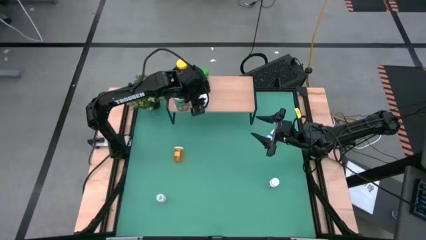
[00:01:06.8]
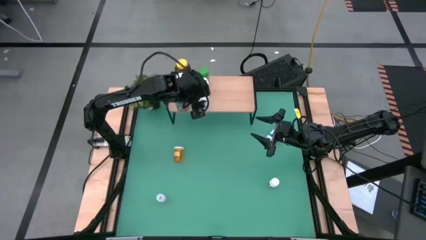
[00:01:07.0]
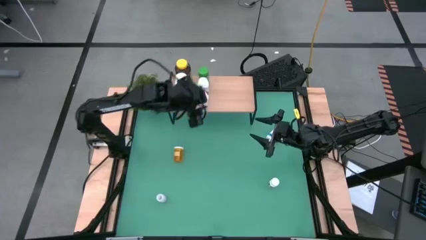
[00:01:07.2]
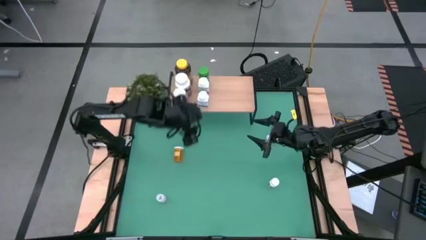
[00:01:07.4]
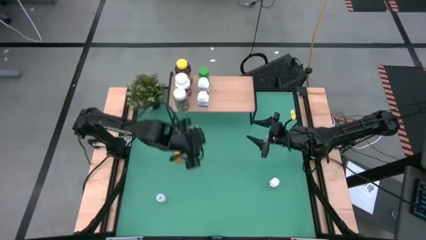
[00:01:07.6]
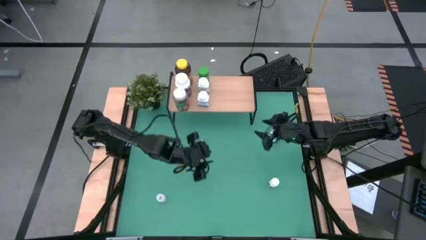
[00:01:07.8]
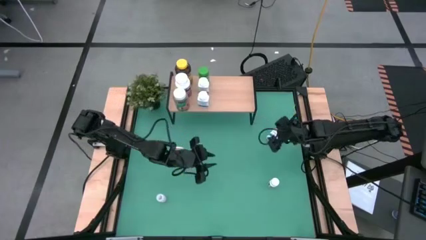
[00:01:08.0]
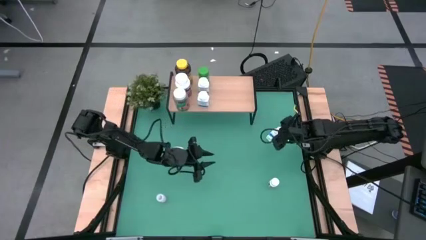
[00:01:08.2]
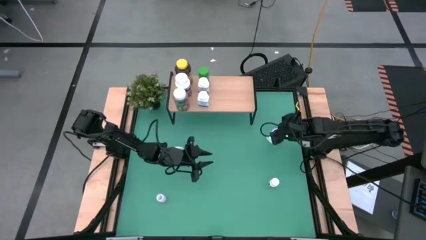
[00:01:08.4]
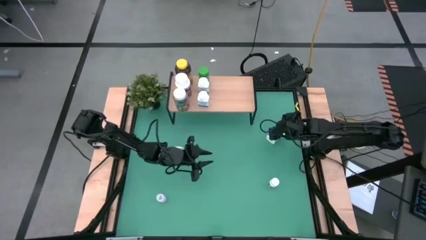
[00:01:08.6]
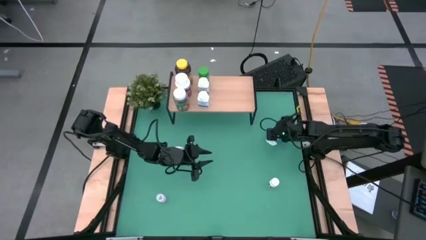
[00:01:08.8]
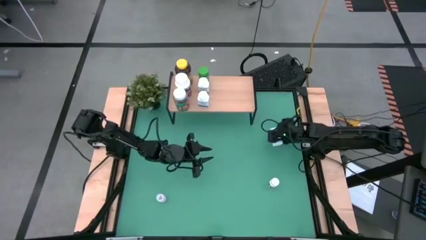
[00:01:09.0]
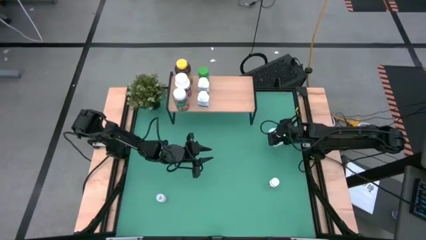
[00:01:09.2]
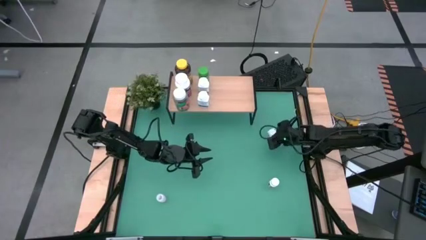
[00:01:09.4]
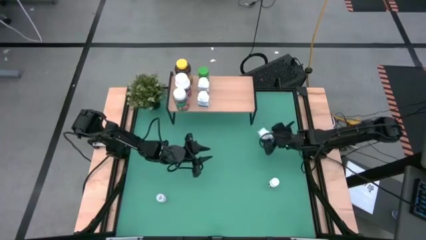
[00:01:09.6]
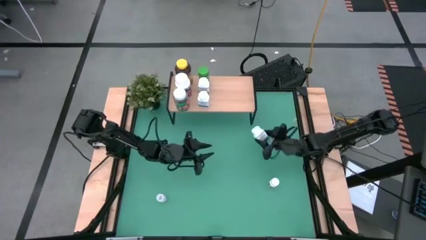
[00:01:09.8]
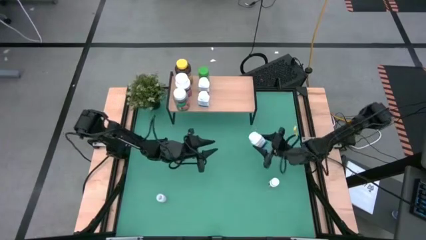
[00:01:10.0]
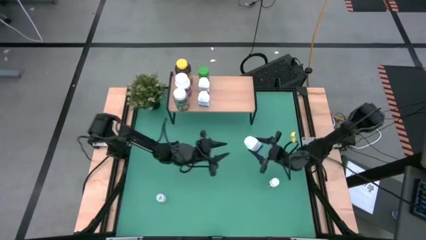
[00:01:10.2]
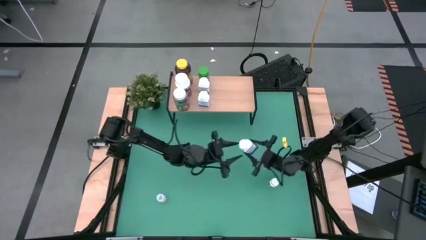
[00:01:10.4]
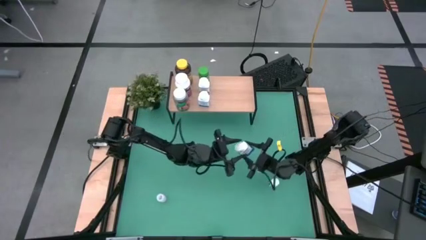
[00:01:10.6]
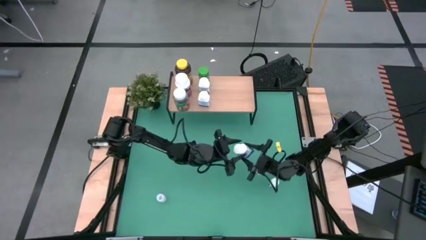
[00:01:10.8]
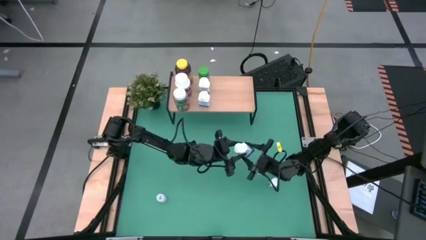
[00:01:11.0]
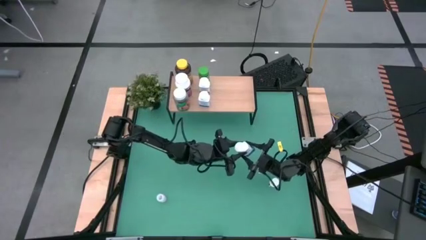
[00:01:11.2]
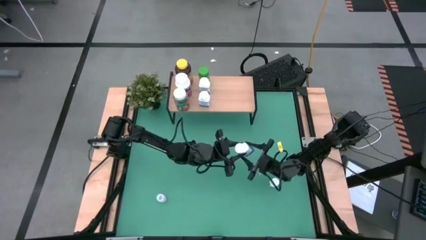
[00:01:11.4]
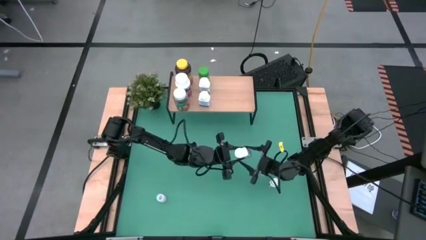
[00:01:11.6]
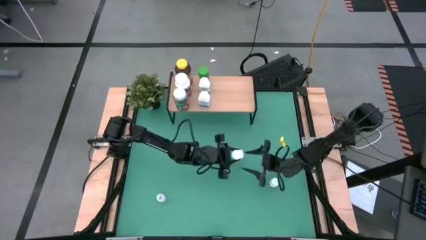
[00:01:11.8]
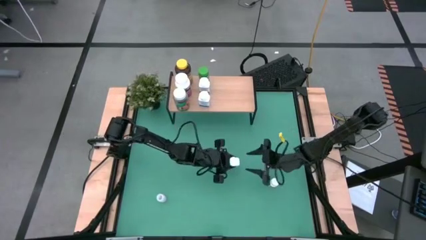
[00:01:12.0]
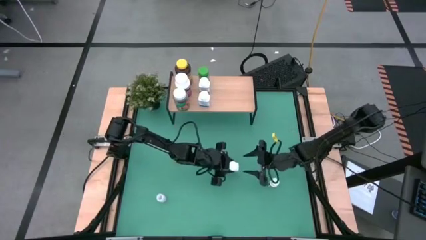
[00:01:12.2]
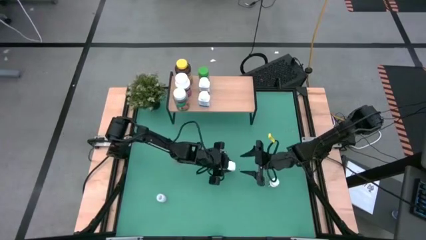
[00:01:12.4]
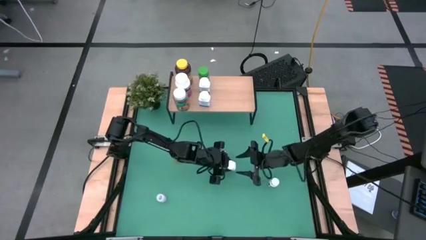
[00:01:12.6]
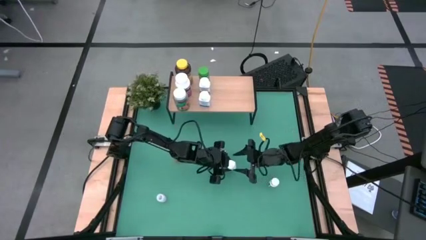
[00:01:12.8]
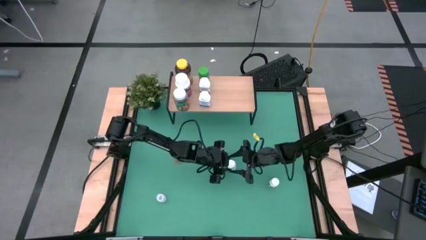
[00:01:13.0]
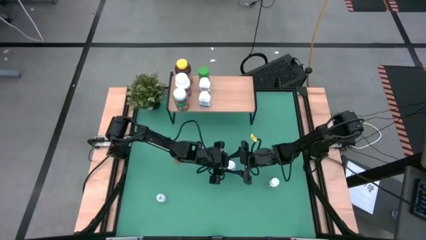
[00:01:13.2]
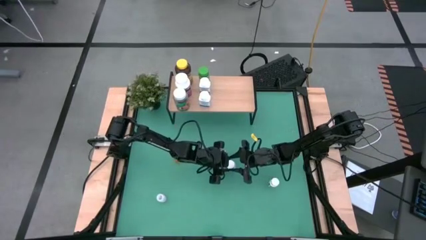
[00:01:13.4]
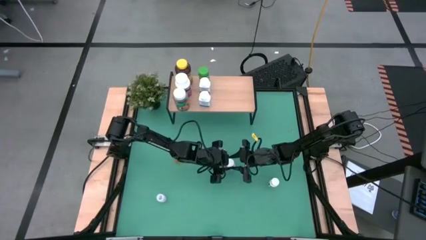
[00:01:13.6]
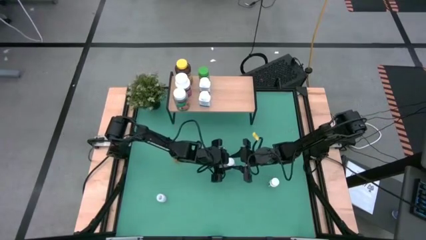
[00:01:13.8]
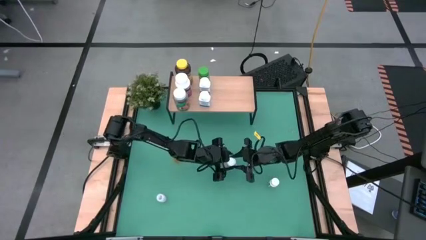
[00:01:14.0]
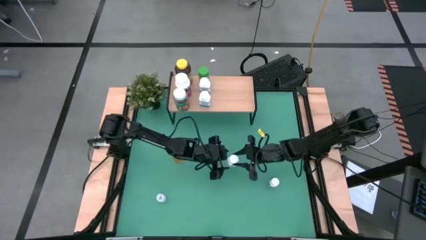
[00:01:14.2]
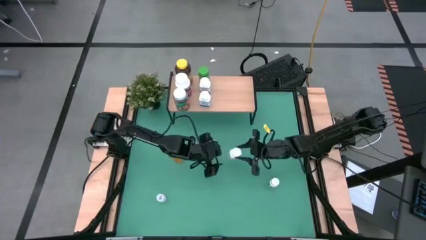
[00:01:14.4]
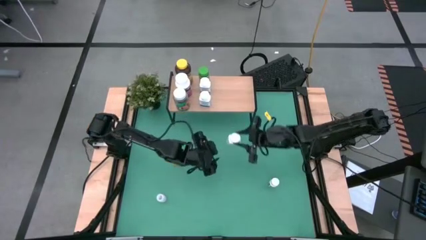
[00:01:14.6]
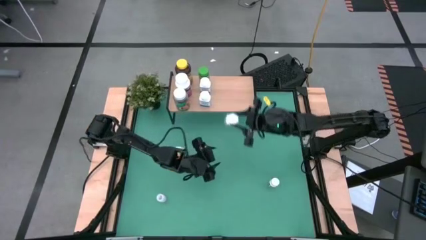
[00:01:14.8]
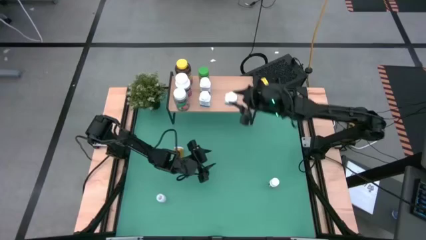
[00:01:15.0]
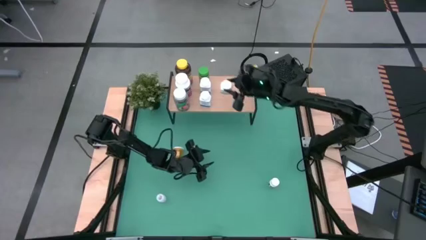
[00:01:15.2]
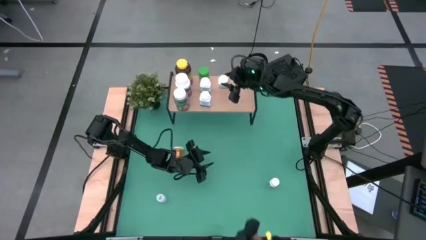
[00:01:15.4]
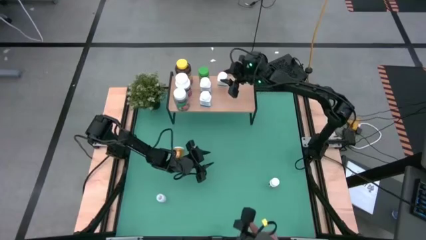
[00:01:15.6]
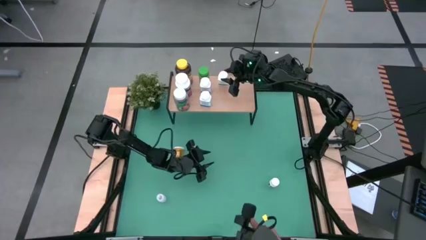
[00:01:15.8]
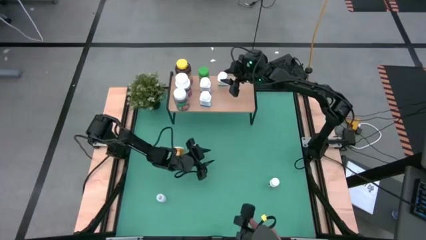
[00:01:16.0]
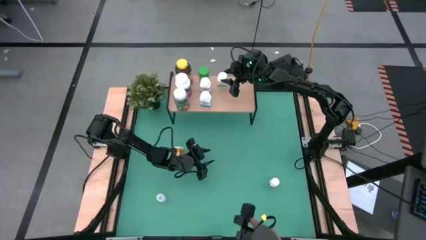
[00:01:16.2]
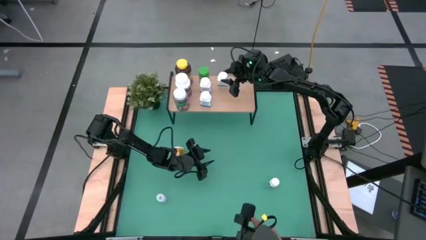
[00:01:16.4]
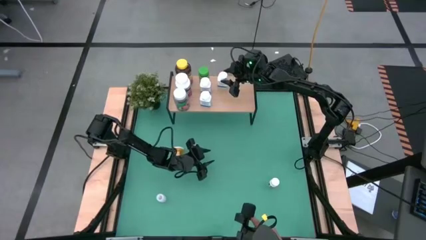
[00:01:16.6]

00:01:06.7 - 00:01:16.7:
Task: Pick and place medicine bottles onto shelf by color
Put the white and blue pill bottle on the shelf

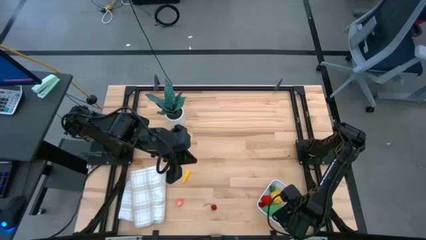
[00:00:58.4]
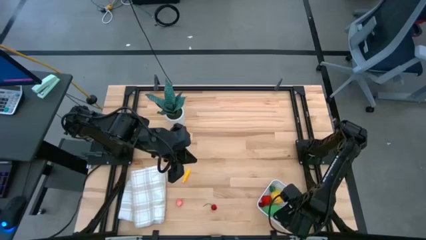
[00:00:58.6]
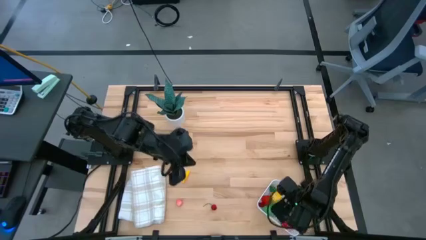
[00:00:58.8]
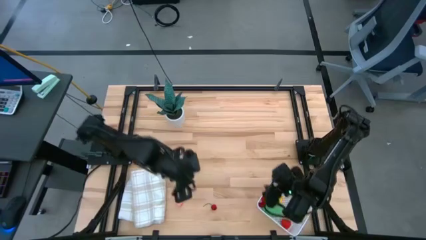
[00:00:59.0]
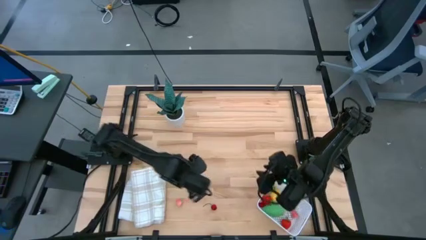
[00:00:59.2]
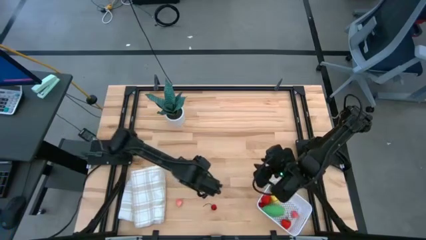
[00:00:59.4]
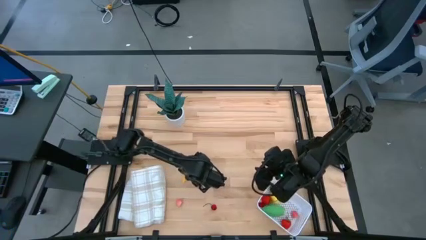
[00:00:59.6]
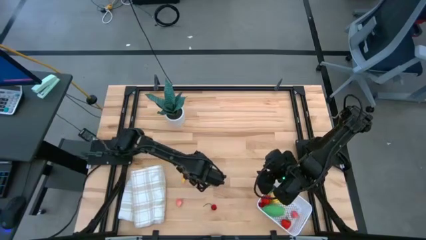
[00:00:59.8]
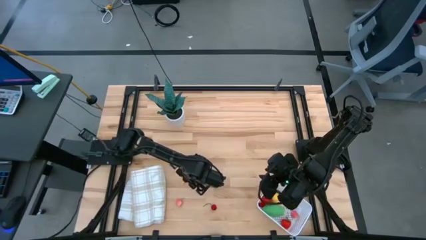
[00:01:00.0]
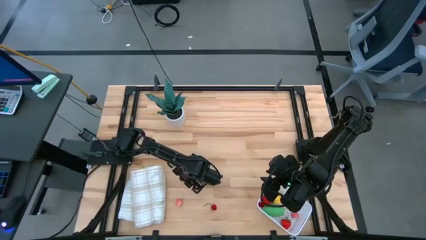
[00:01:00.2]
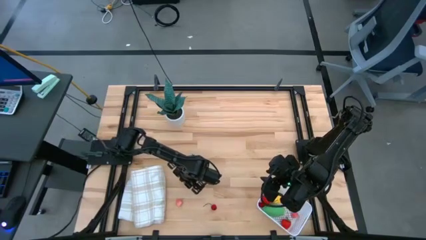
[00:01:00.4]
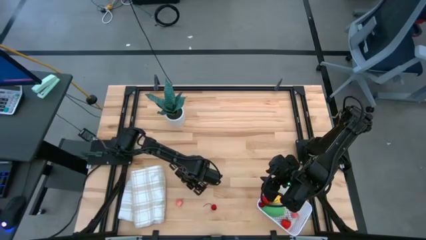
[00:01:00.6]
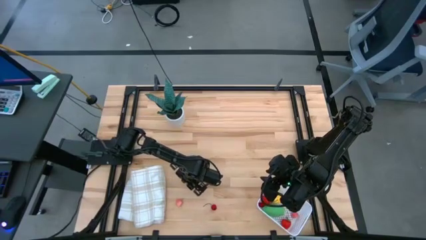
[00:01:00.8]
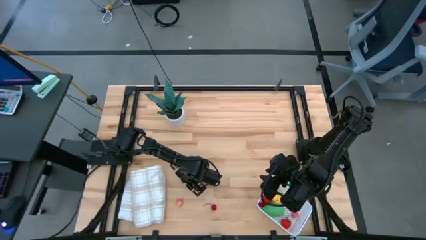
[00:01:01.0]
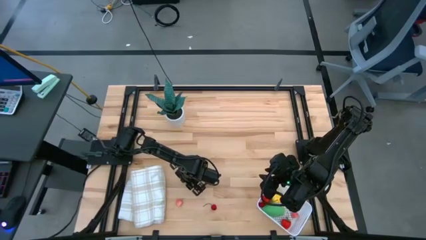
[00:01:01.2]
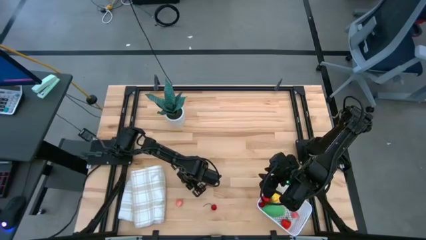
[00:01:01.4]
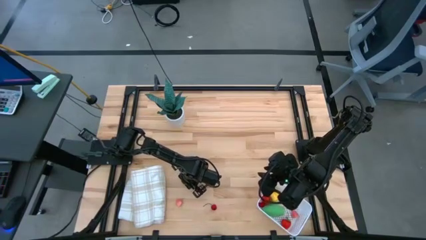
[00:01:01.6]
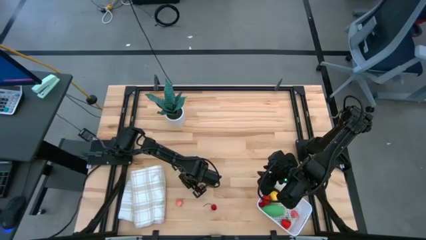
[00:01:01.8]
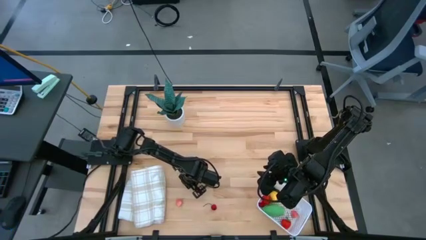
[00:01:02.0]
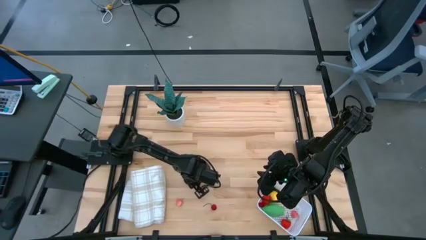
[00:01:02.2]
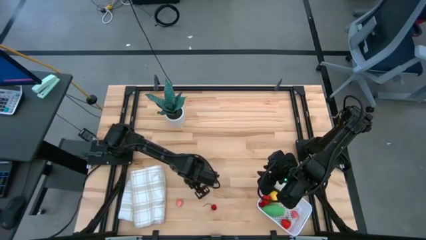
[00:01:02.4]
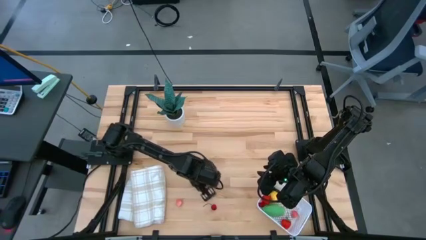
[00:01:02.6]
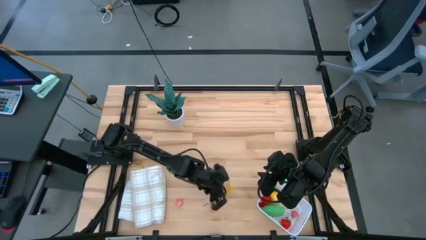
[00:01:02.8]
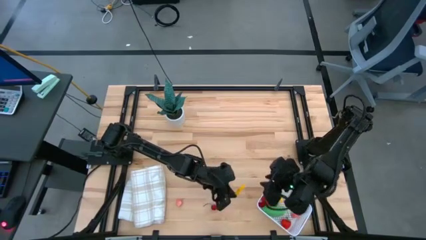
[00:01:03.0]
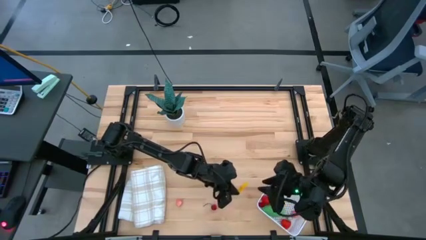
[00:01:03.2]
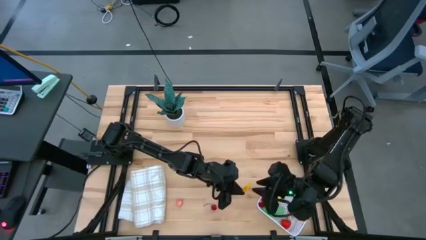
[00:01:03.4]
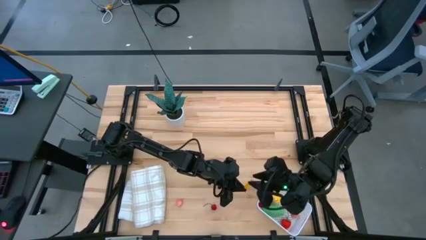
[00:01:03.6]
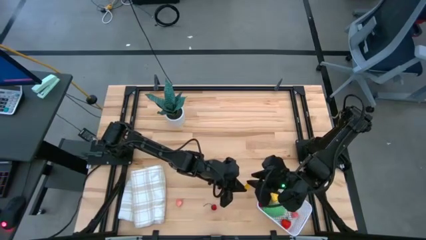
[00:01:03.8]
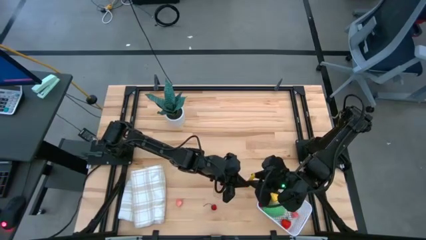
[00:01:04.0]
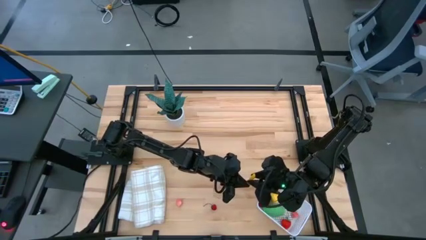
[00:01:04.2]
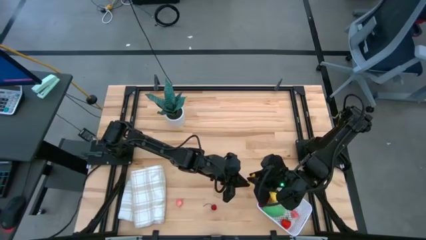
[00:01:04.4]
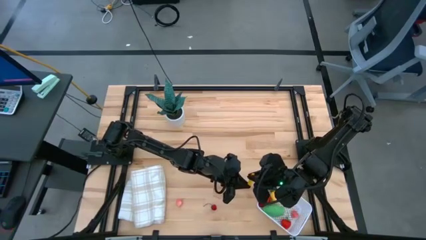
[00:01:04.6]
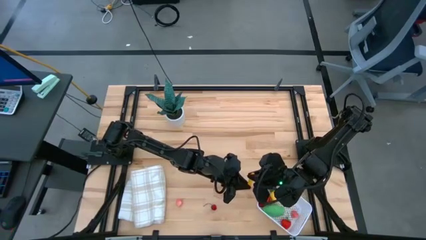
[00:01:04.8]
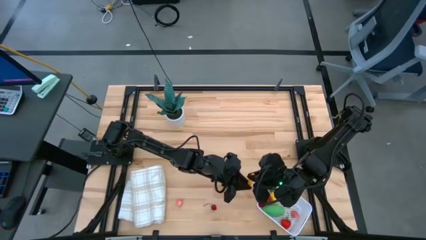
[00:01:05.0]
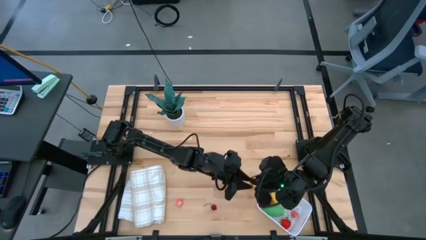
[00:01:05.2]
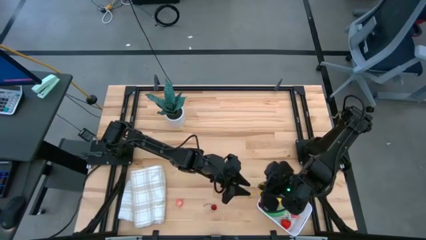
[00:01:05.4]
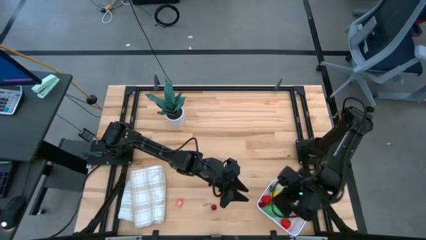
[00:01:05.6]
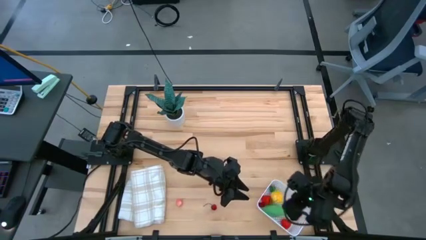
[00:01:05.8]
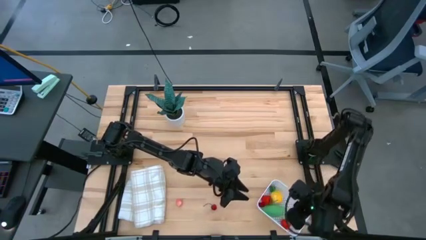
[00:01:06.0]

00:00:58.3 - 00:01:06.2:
Task: Pick and placing Produce into tupperware
Put the yellow corn into the white bin
